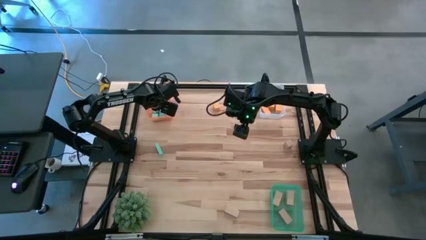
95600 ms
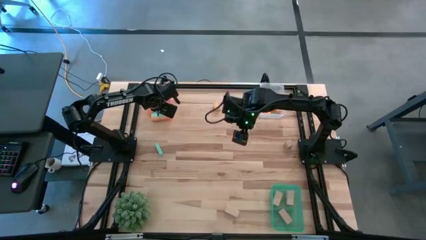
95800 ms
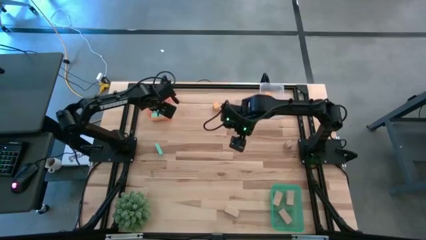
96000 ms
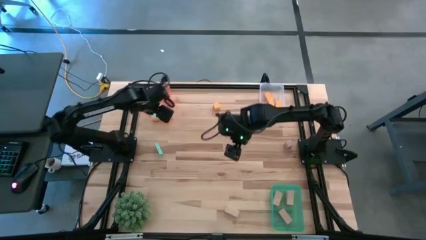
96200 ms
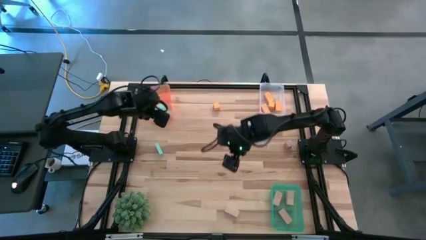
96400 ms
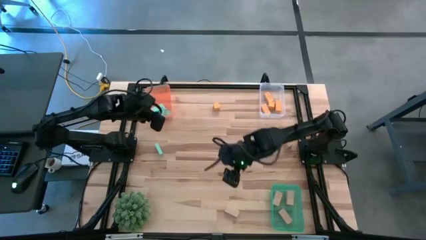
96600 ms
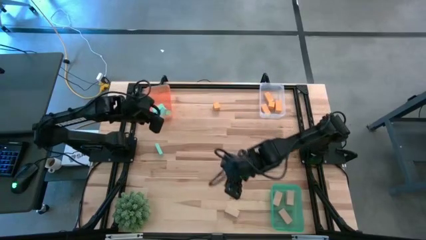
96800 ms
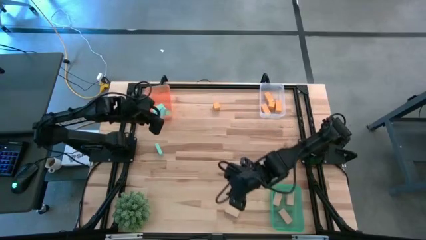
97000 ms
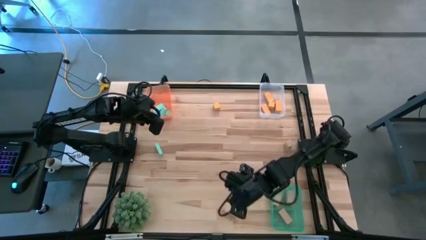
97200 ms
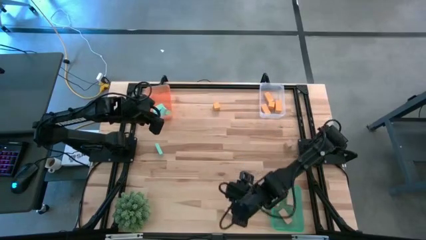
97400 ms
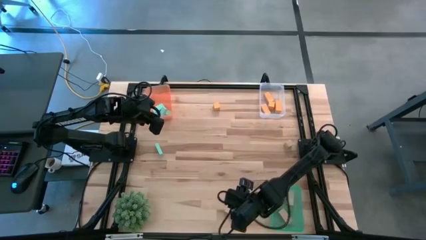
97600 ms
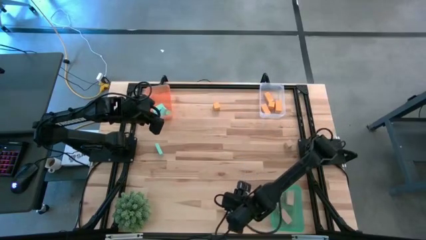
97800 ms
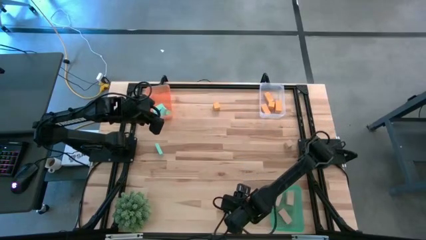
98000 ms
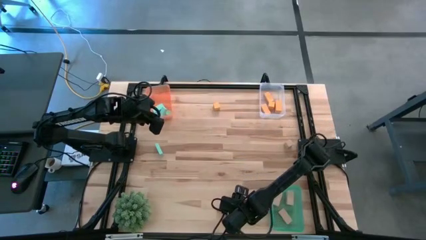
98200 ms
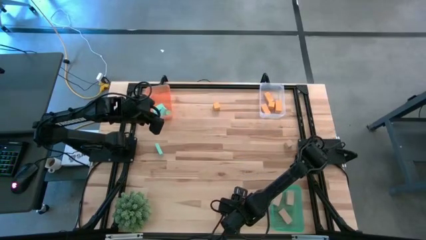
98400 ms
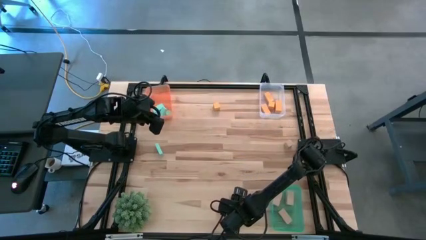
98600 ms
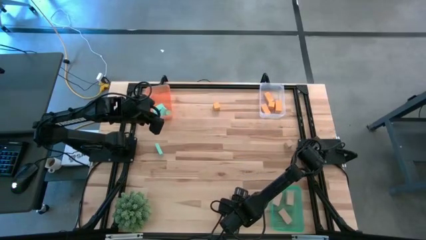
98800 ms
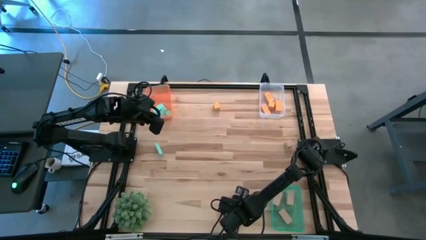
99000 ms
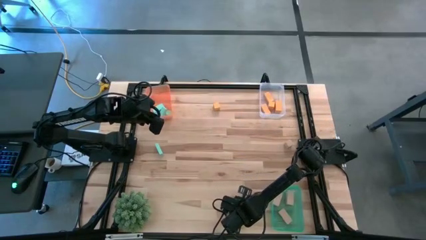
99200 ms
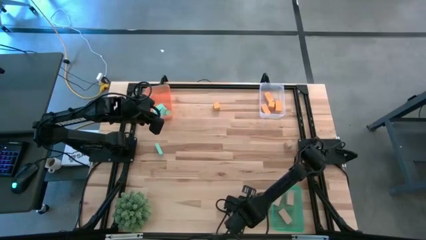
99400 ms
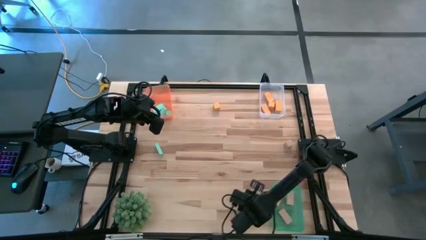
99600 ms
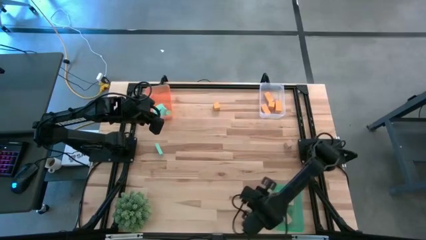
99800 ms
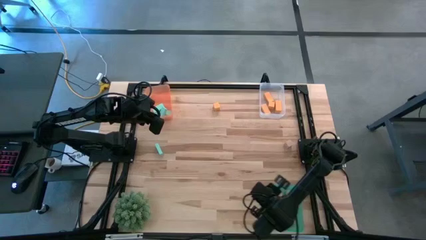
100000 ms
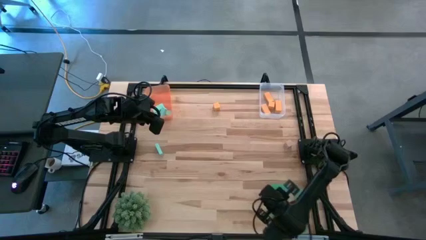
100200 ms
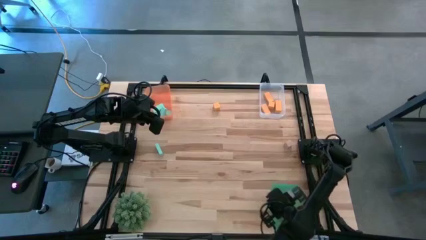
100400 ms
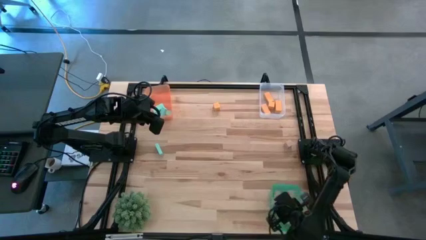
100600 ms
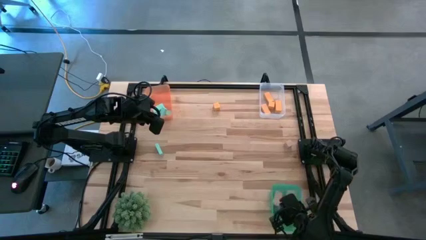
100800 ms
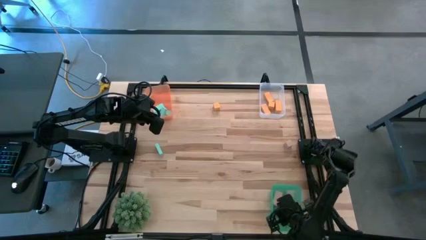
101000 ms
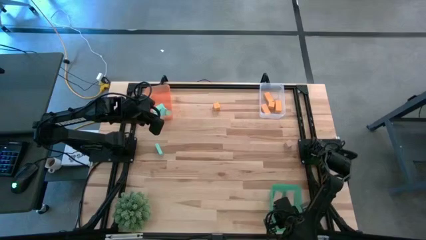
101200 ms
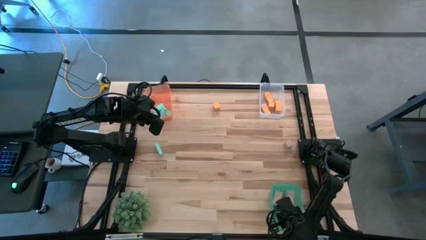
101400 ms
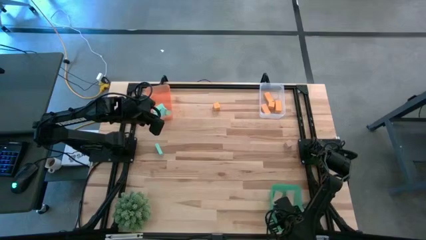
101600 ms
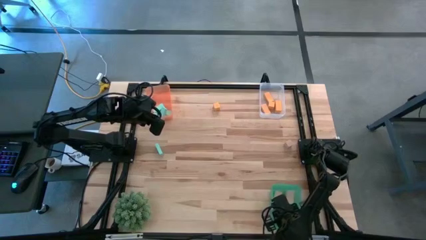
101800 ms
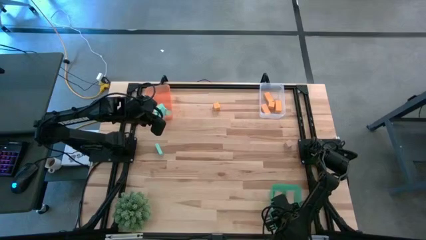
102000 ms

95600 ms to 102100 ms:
Task: Sort & place blocks by color
Put the brown block into the light green bin

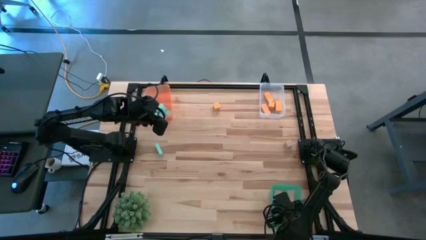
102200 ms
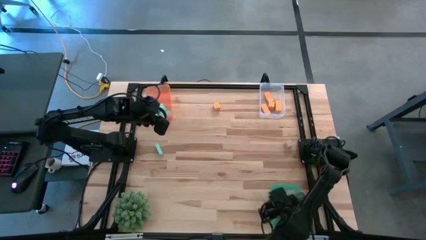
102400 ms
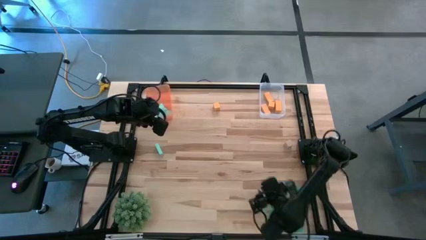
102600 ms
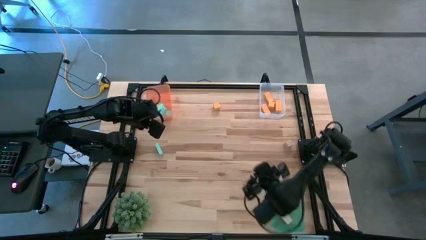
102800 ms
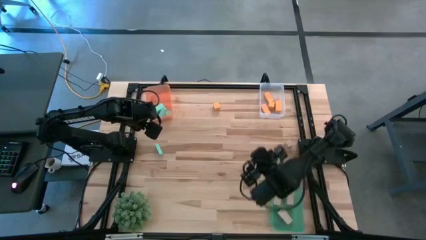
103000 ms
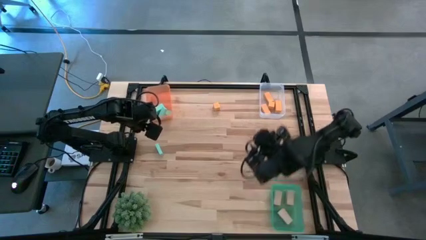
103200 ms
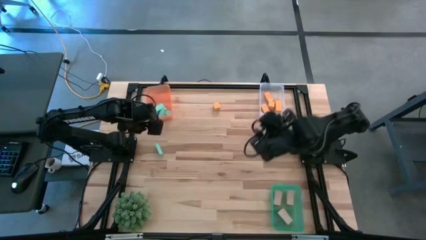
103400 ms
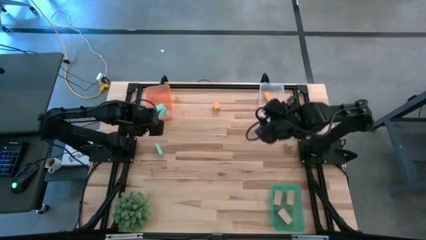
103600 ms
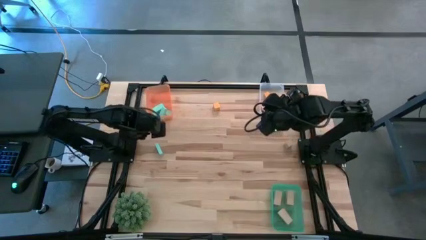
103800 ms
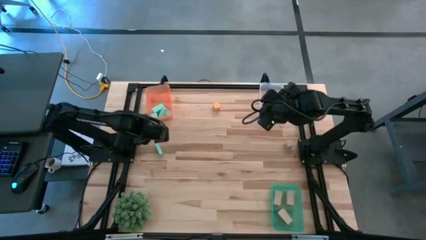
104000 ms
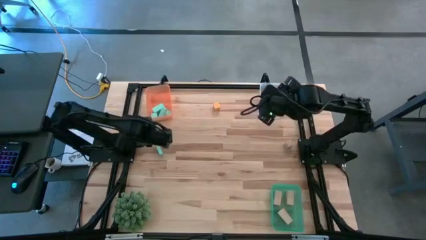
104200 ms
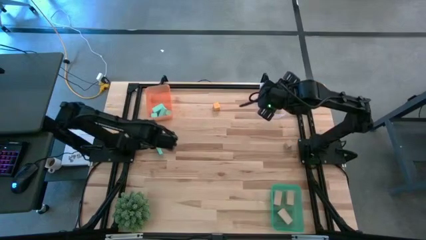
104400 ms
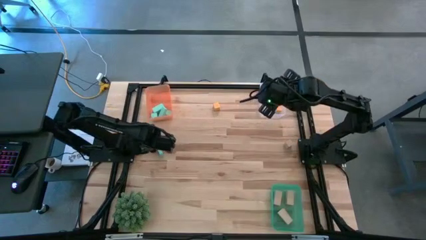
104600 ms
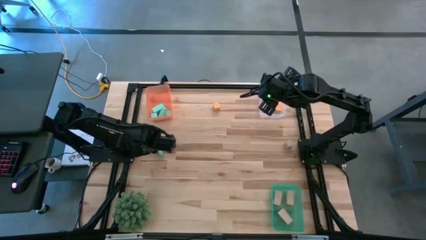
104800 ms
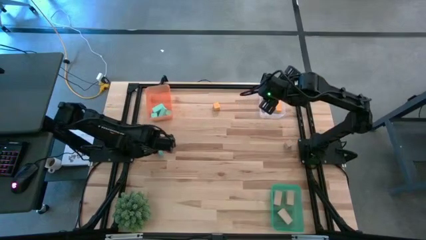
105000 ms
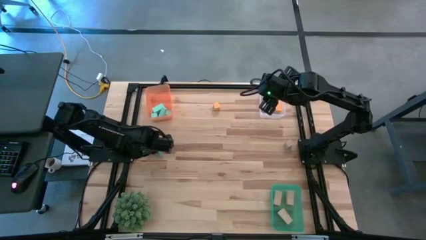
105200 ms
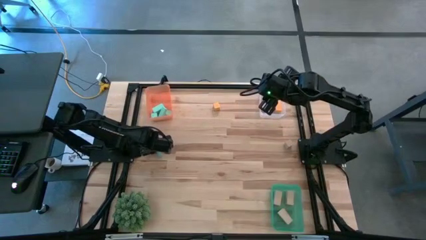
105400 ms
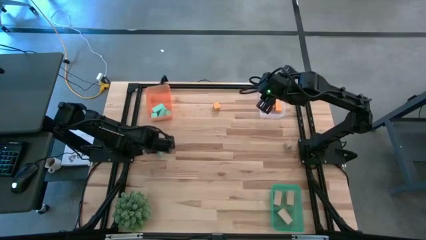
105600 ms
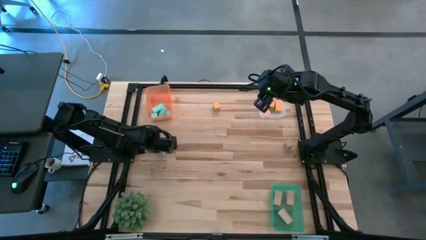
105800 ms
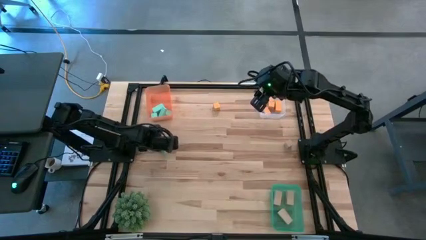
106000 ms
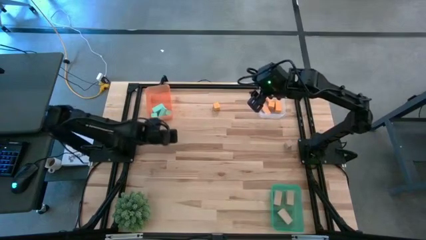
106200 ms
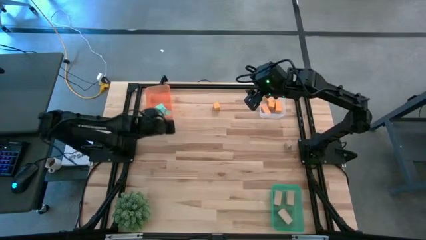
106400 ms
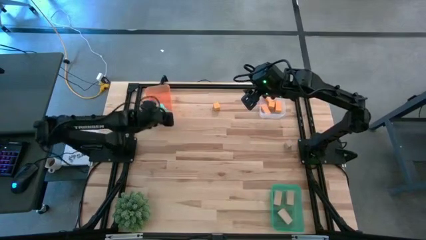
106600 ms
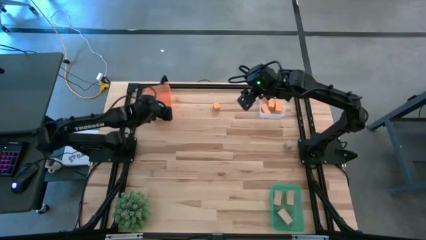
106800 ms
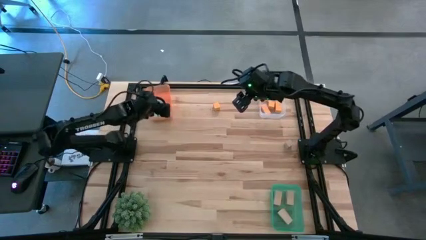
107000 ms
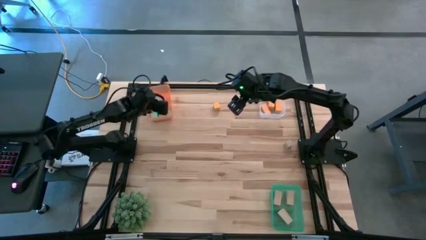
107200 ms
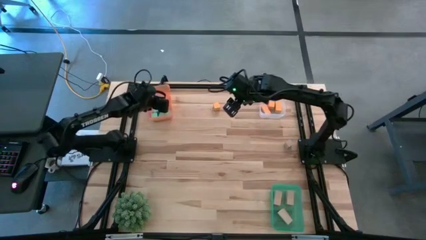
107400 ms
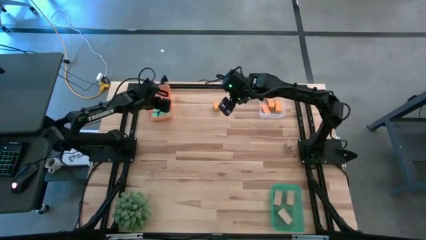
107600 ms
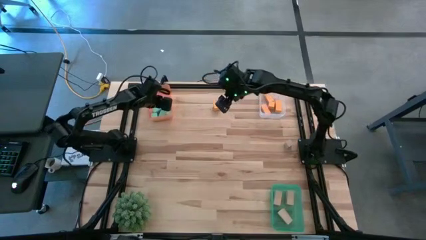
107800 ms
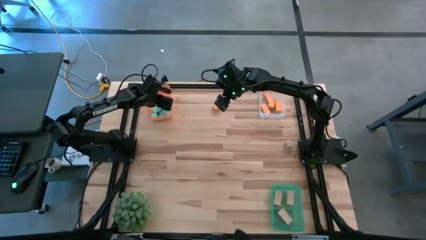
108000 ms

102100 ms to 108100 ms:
Put the blue block into the orange bin

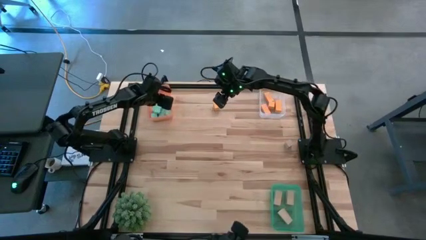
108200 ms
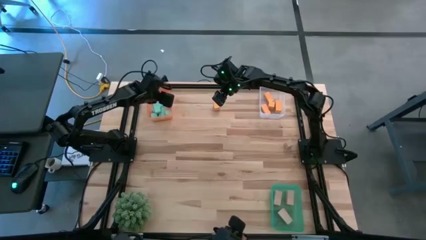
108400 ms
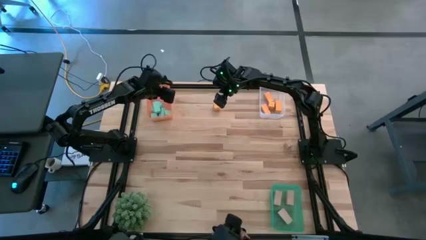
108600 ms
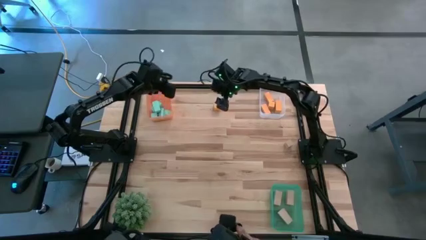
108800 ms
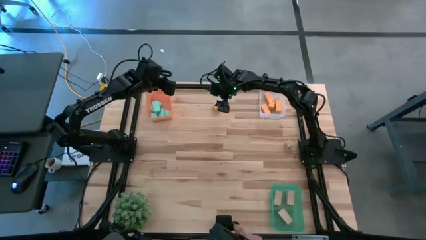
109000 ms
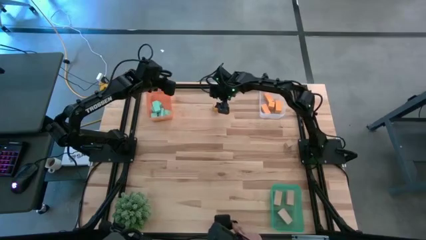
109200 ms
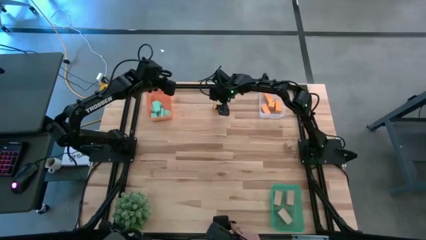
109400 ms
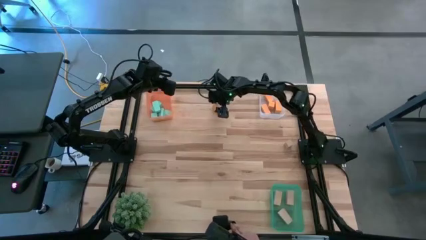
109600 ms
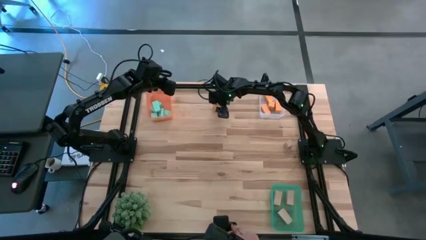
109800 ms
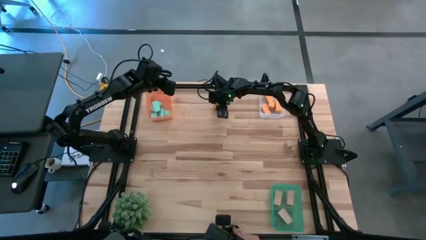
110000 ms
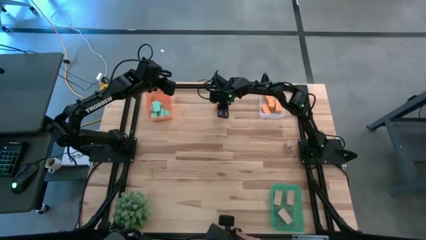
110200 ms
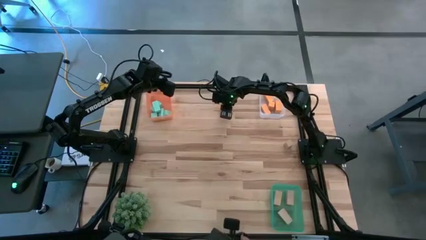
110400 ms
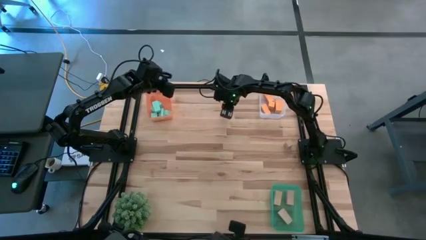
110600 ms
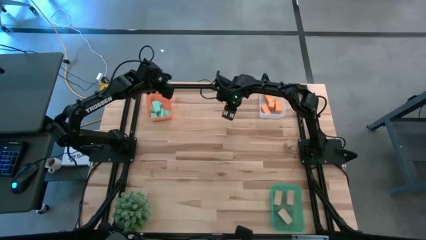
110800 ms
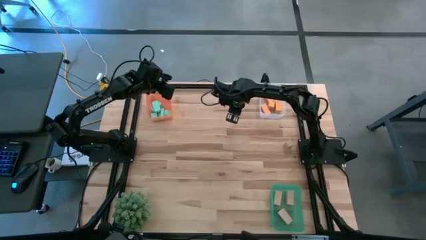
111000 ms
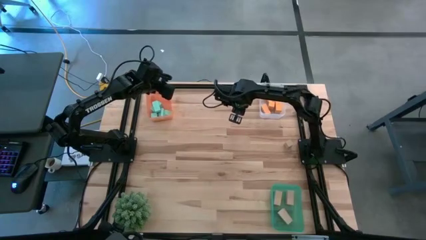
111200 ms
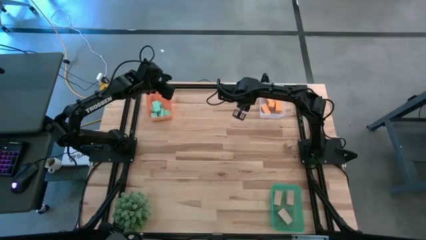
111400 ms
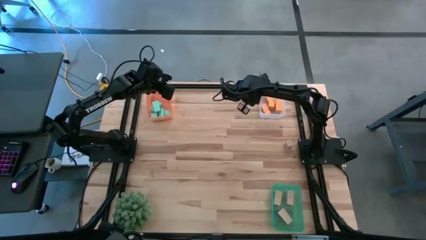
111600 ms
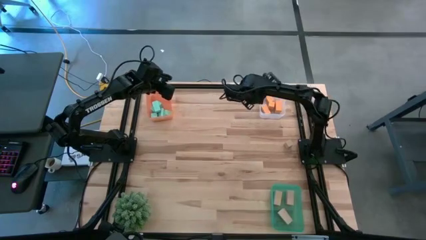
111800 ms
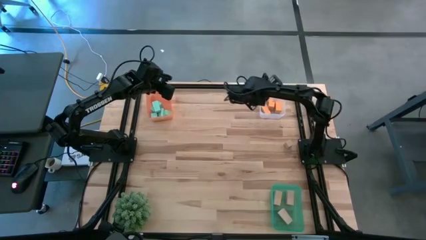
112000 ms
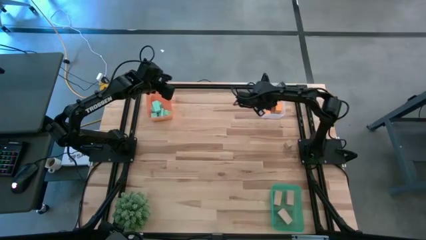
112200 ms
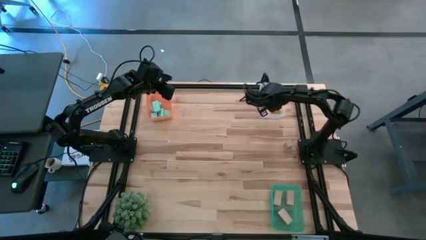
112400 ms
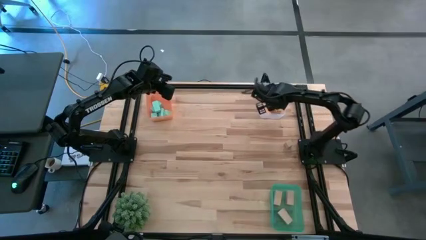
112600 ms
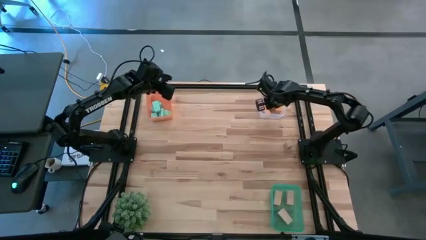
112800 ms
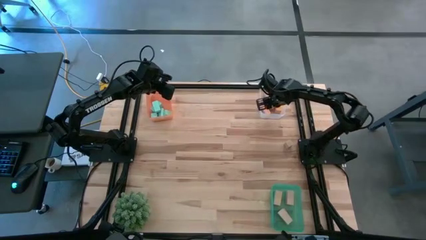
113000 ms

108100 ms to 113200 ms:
Put the orange block into the transparent bin
